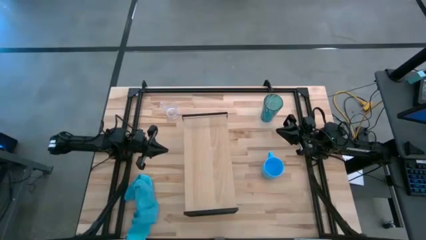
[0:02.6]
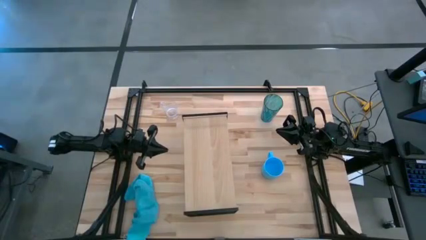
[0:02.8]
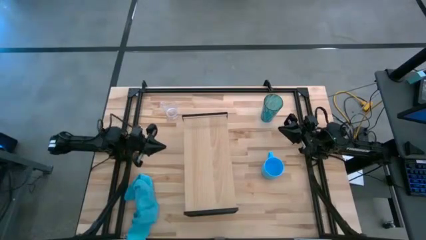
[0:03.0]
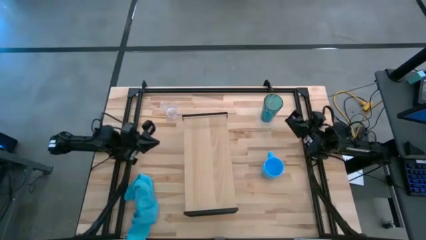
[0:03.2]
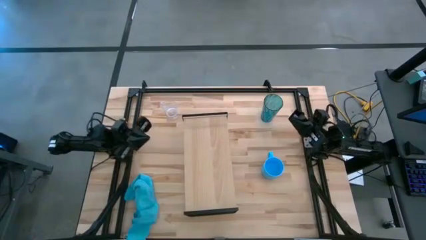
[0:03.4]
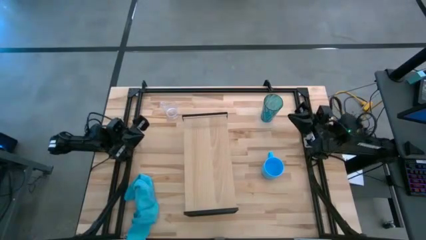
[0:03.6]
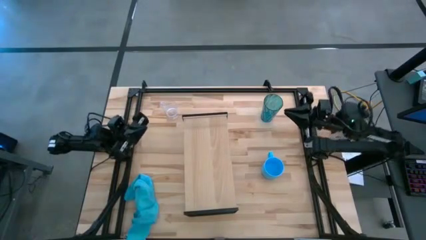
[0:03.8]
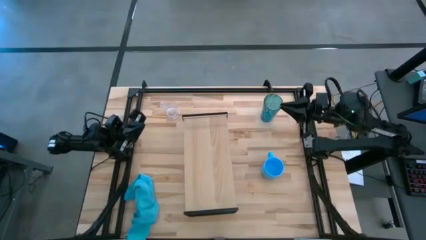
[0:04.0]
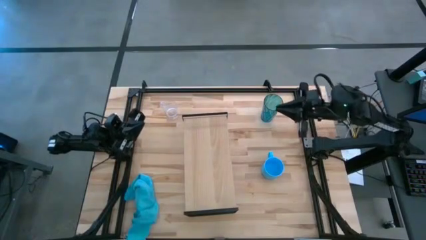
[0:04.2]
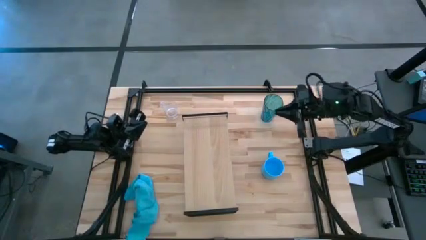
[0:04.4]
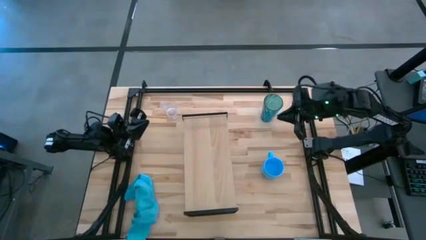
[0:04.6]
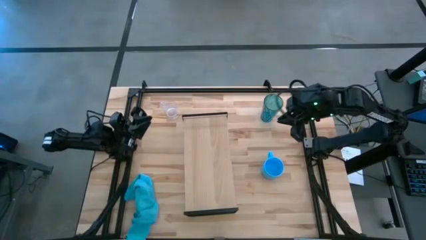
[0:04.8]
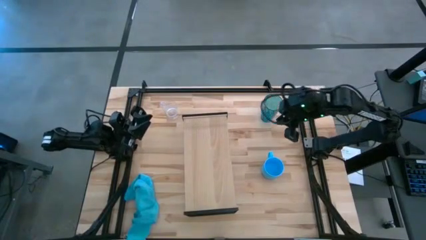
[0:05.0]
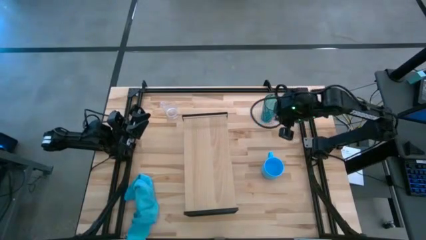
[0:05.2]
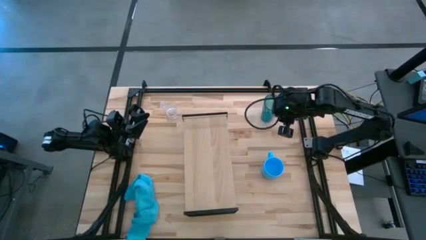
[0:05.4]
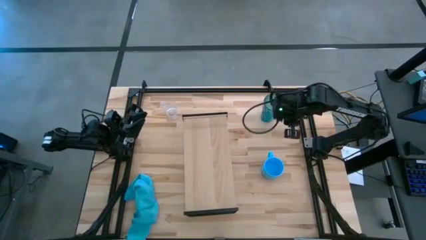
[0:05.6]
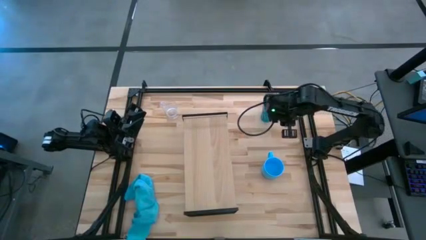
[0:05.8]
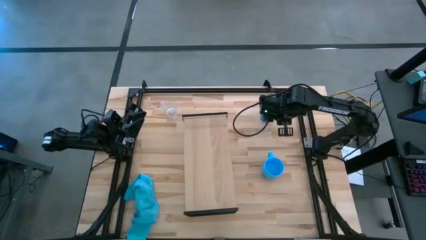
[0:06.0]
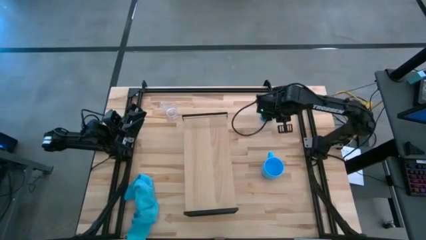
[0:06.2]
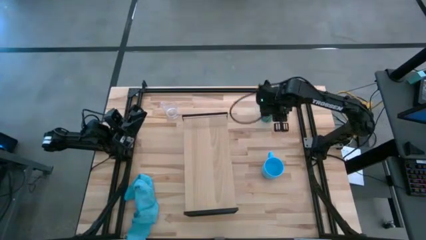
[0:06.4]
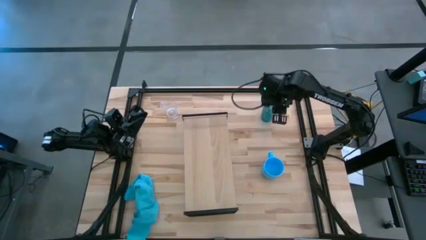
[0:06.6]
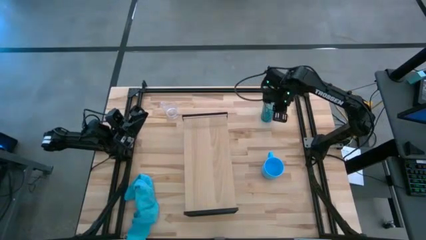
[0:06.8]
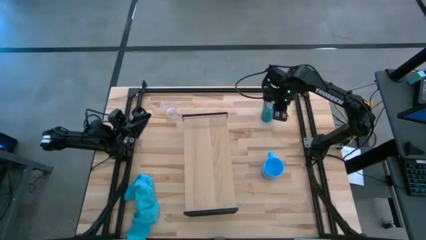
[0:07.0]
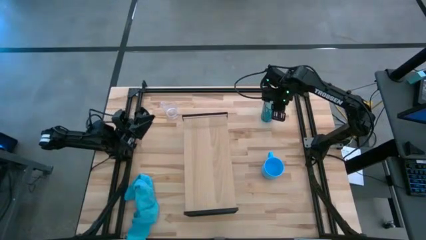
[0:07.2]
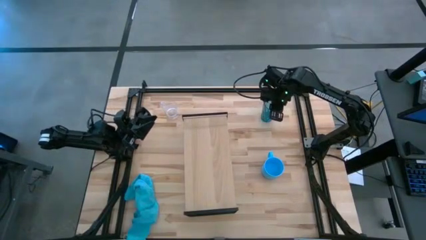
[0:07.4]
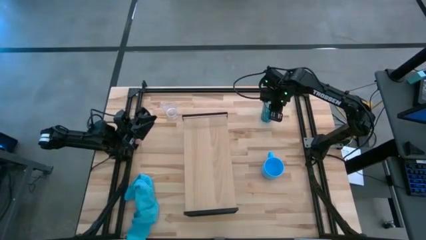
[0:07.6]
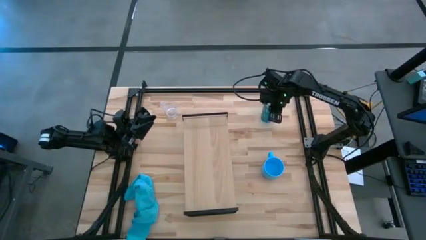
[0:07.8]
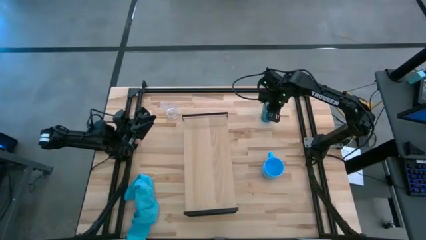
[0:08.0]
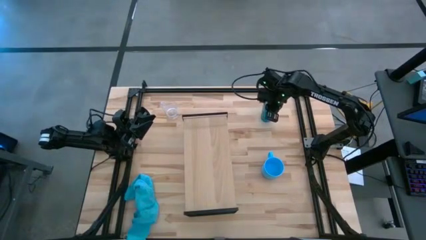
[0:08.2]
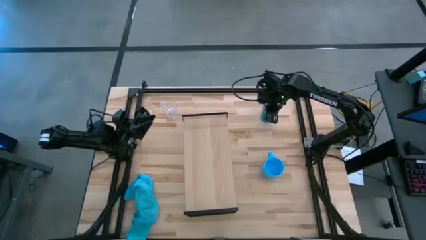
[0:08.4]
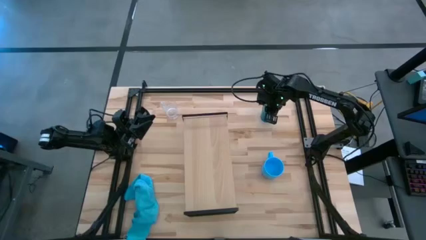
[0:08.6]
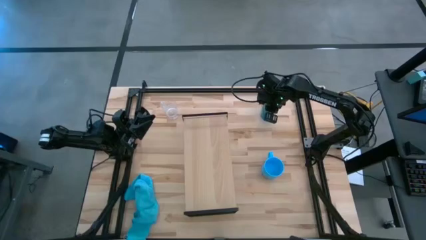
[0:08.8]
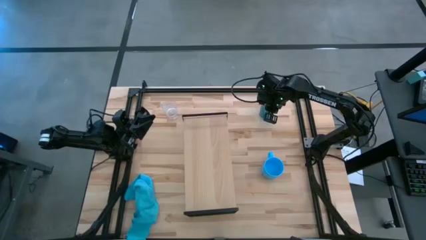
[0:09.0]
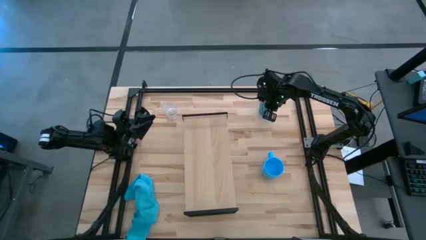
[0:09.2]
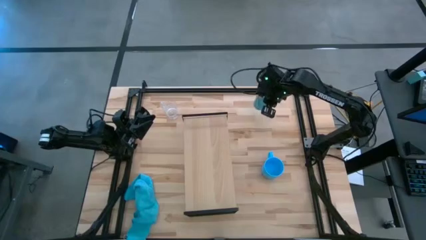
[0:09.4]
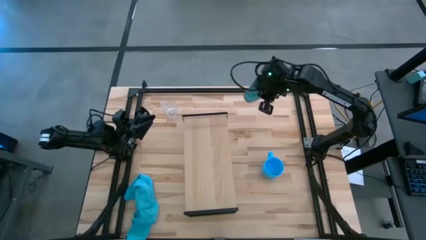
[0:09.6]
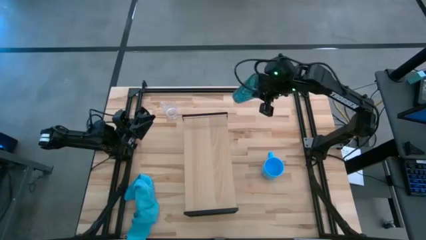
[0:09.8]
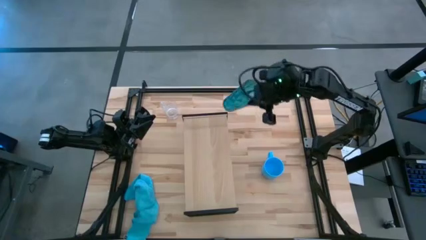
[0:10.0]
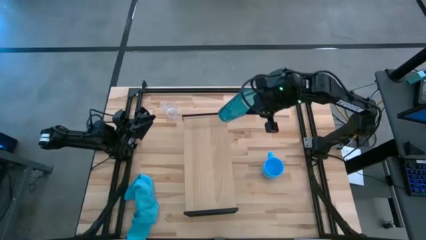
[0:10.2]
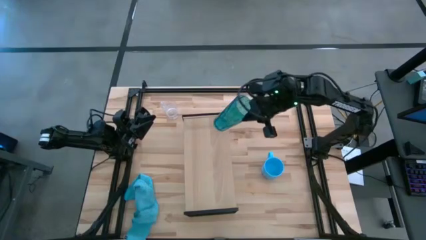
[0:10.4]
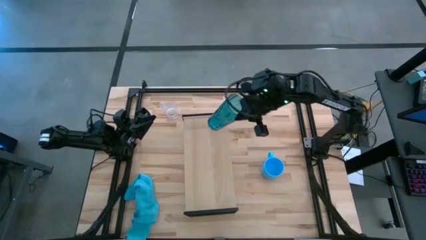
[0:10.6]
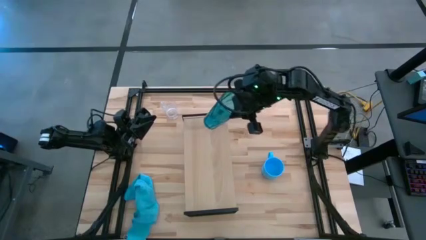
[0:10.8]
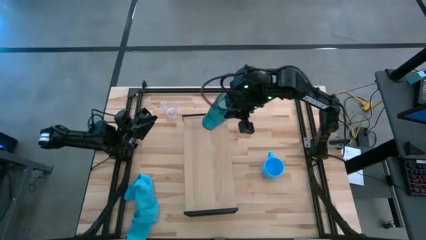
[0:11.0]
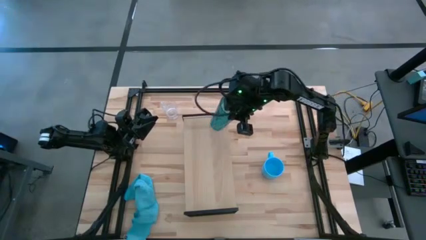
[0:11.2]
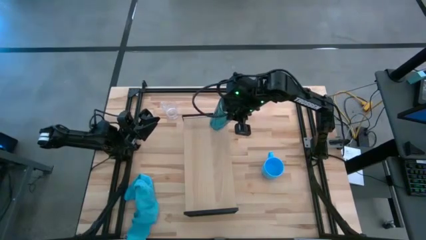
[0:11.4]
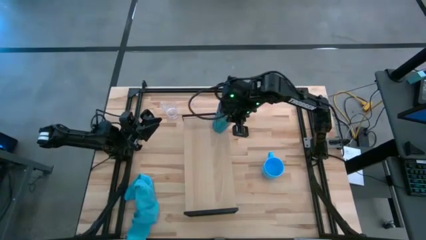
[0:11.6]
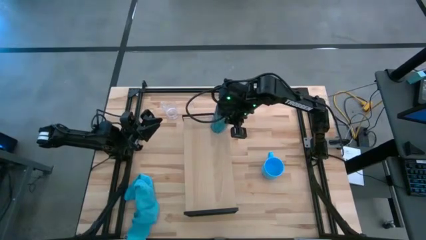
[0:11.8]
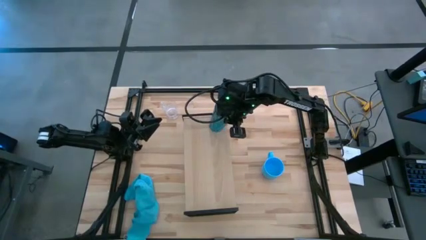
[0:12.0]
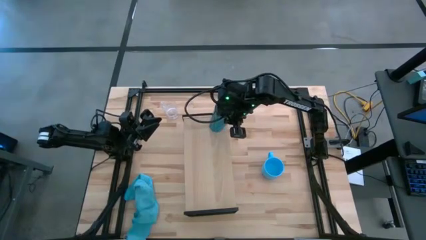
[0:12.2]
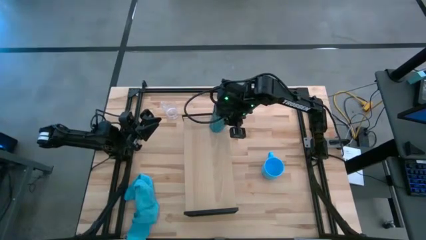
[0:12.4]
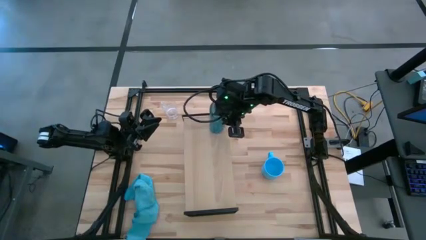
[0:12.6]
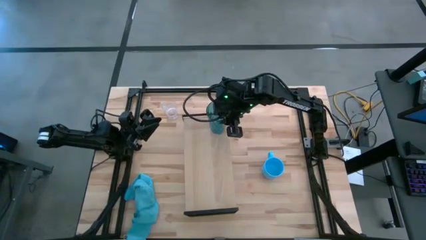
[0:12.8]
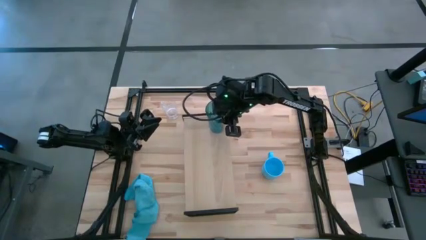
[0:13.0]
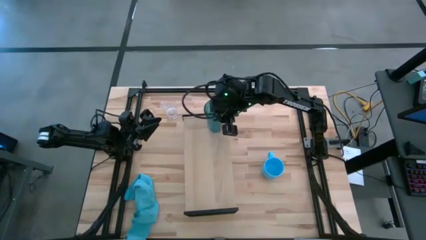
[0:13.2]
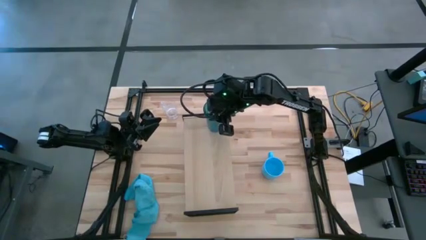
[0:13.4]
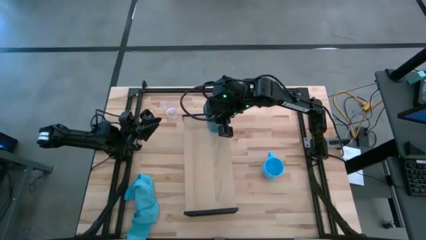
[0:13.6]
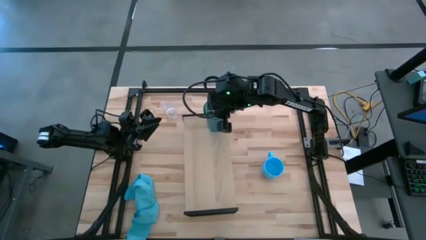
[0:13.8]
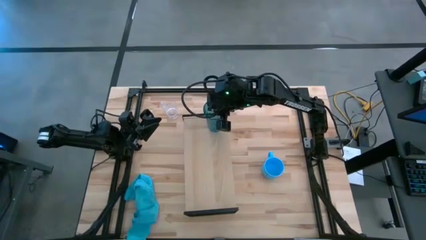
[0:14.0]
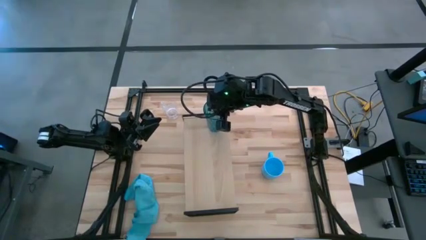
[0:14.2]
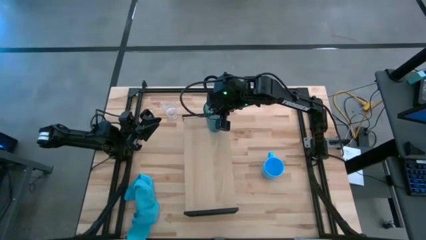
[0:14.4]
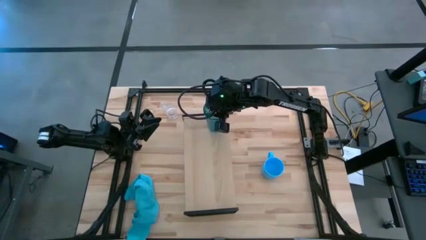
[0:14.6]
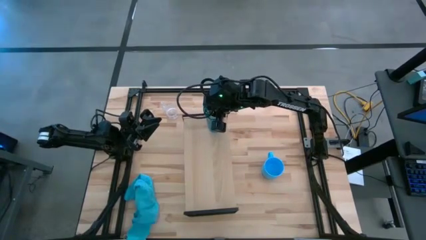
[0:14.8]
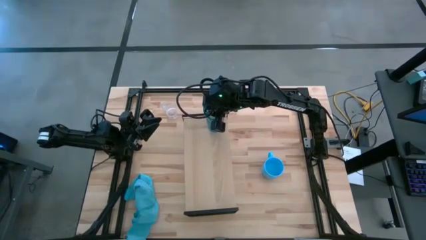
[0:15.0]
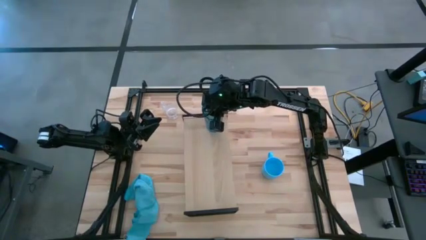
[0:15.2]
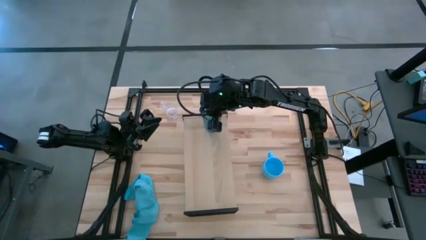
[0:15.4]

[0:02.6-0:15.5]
Task: Stack small to large cups/mugs on shelf
Put the blue transparent cup on the shelf
